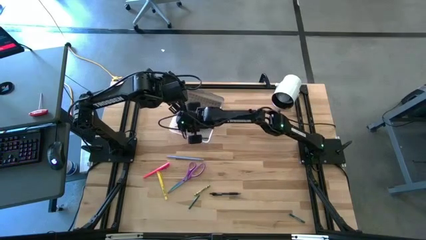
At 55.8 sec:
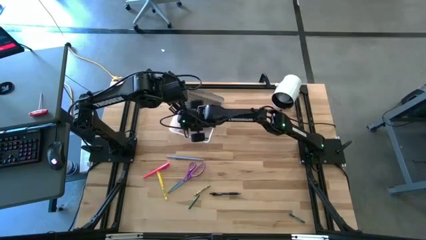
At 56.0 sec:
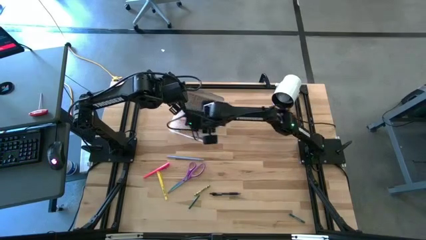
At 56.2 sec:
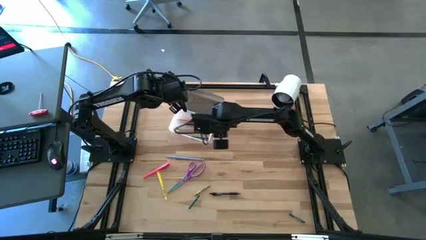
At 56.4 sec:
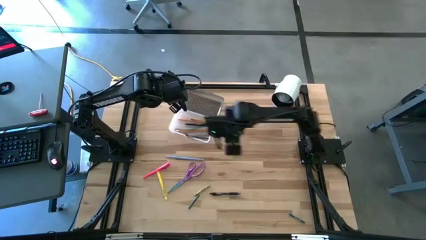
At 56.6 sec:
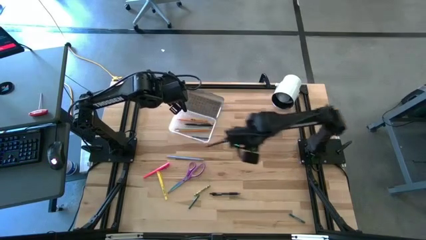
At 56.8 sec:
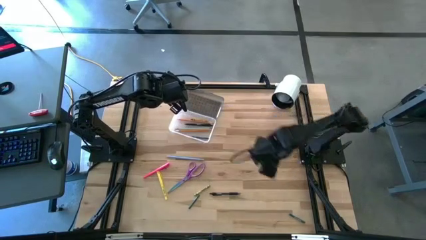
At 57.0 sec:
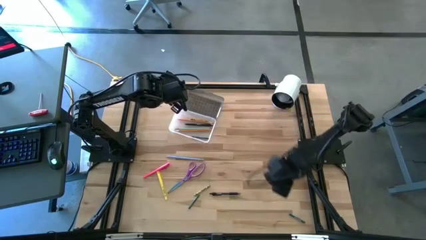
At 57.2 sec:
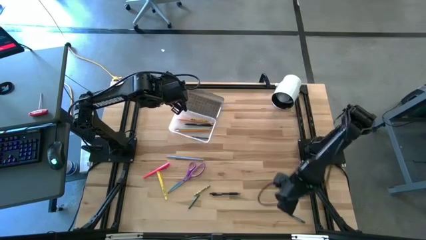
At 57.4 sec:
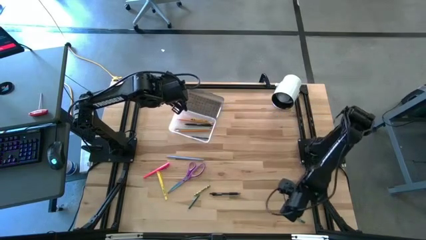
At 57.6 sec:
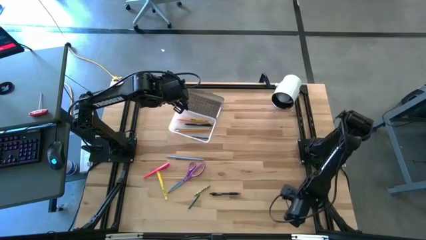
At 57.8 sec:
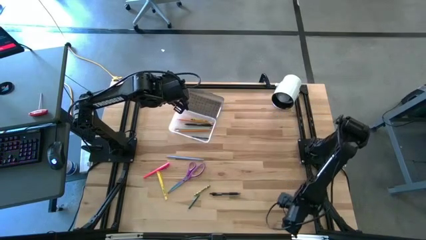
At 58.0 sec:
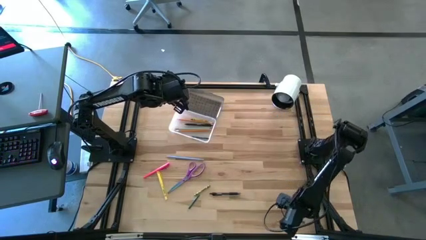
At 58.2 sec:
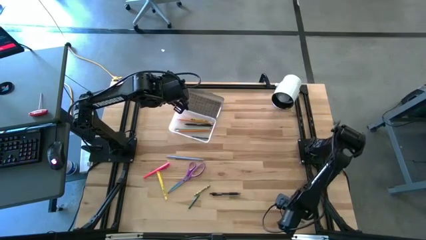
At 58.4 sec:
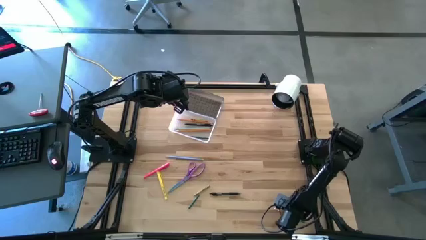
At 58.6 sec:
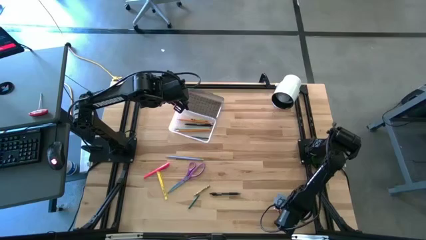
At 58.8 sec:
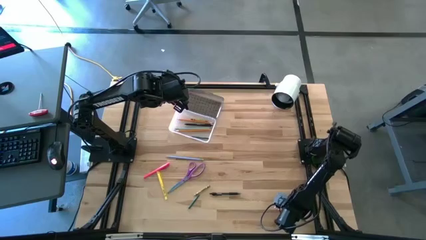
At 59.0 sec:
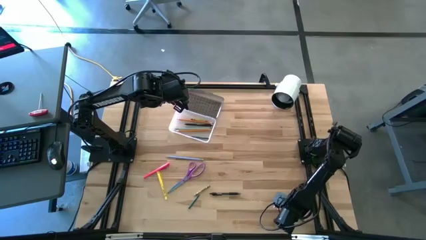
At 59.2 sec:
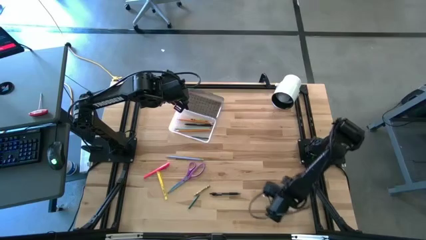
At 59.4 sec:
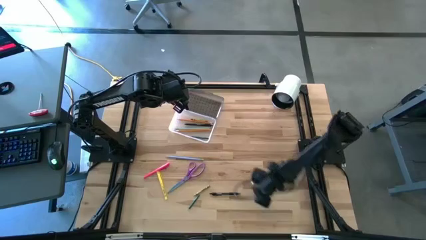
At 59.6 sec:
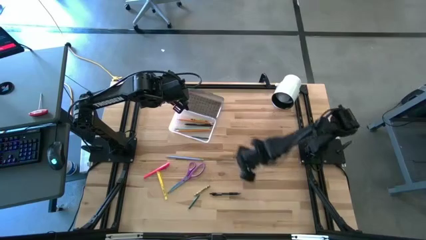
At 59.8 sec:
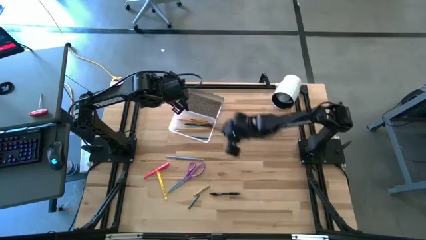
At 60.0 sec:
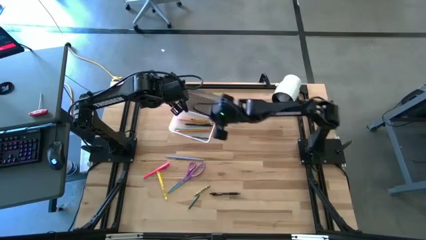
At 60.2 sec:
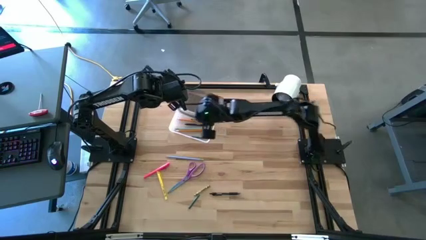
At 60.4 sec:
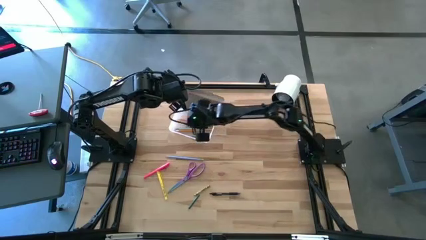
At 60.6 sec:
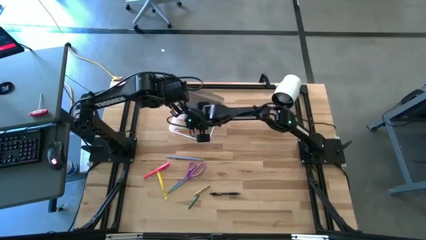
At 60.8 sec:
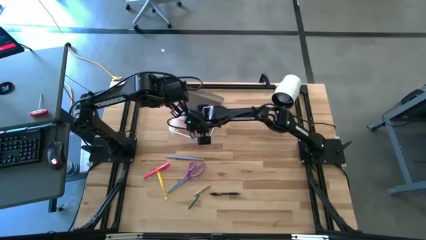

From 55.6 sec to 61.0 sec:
Task: Pick & place school supplies into a supply box
Put the green crayon into the black supply box

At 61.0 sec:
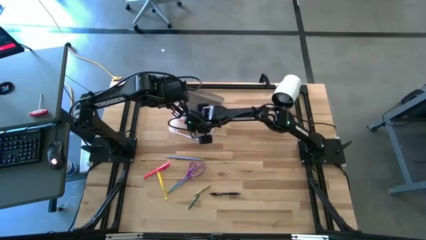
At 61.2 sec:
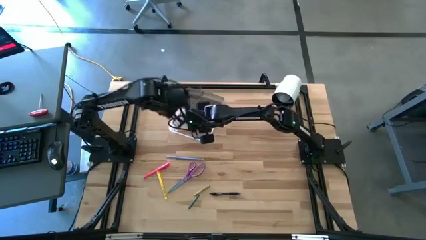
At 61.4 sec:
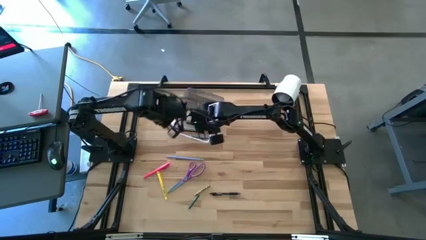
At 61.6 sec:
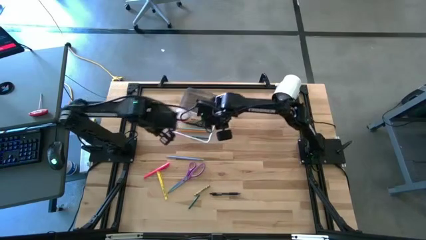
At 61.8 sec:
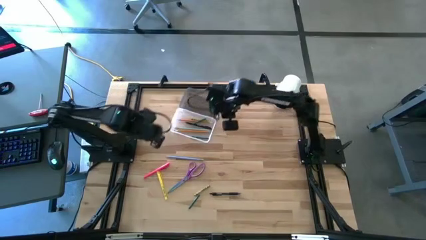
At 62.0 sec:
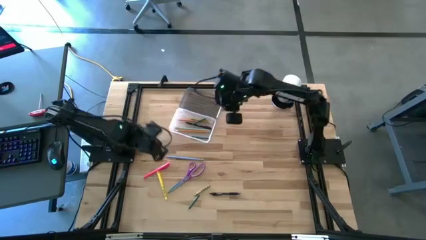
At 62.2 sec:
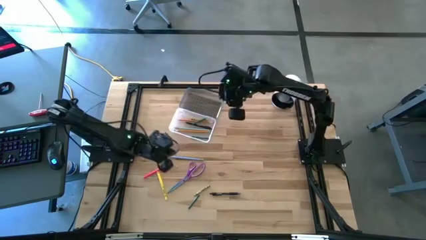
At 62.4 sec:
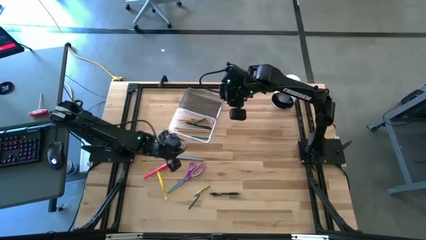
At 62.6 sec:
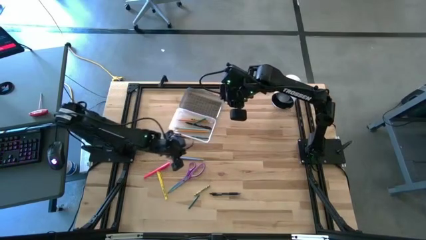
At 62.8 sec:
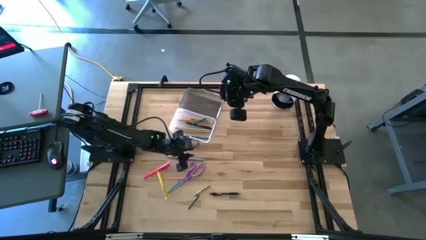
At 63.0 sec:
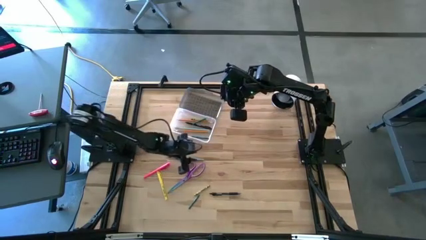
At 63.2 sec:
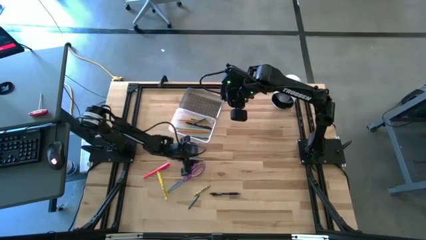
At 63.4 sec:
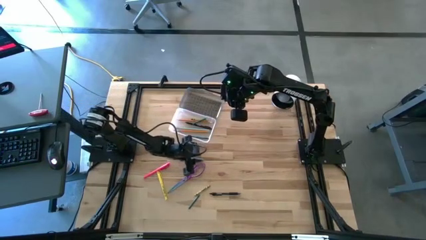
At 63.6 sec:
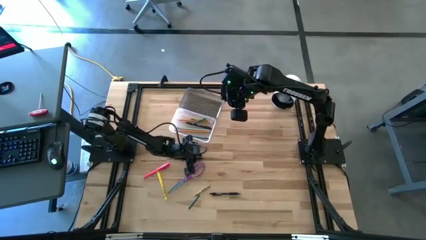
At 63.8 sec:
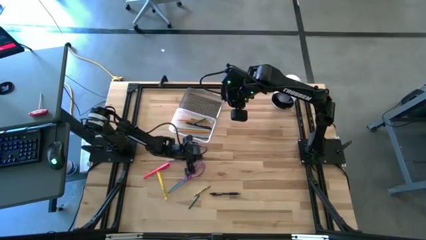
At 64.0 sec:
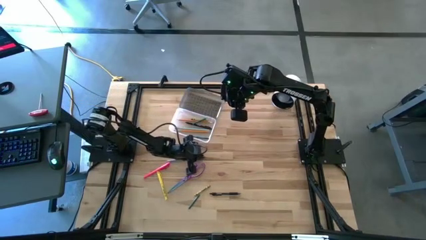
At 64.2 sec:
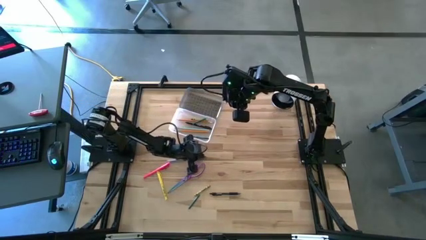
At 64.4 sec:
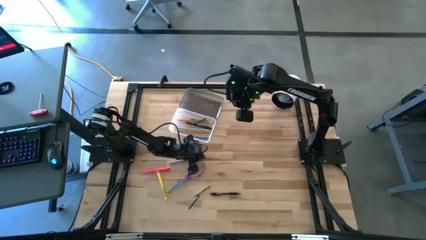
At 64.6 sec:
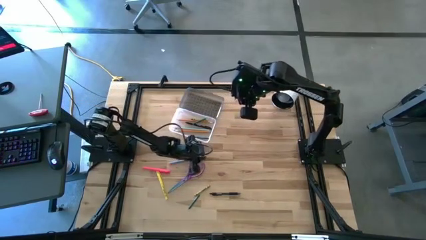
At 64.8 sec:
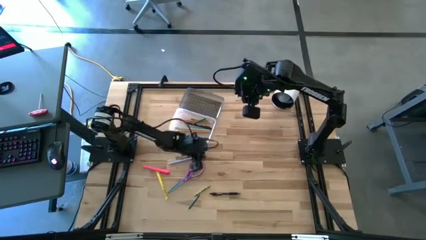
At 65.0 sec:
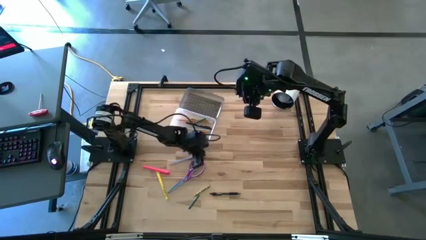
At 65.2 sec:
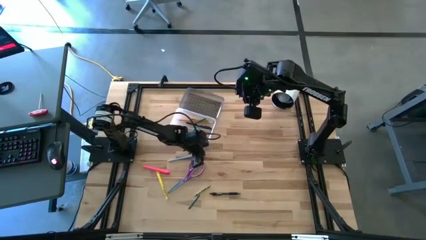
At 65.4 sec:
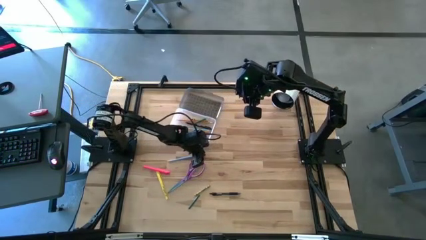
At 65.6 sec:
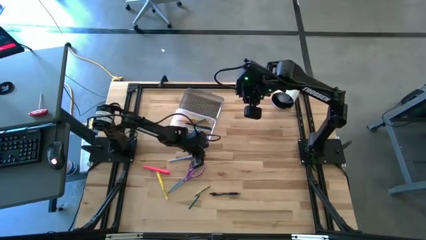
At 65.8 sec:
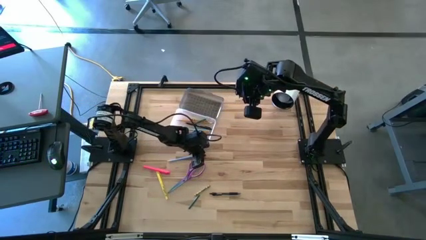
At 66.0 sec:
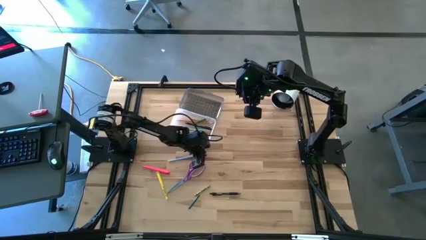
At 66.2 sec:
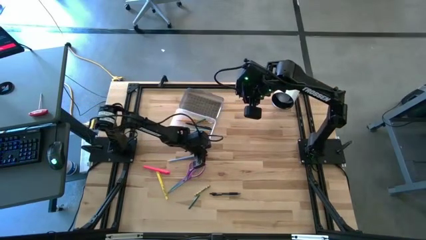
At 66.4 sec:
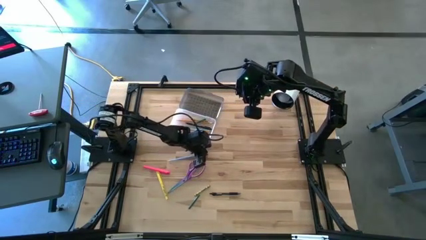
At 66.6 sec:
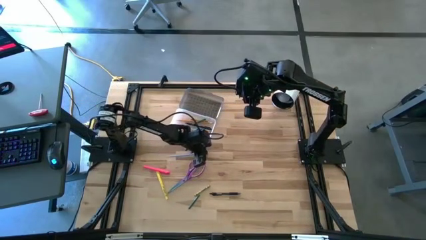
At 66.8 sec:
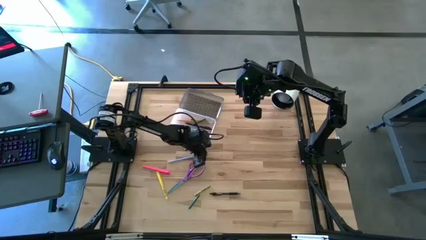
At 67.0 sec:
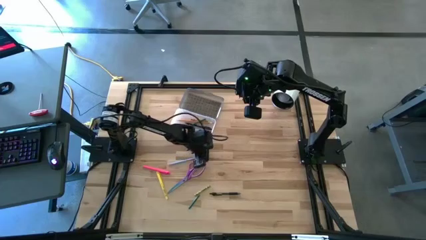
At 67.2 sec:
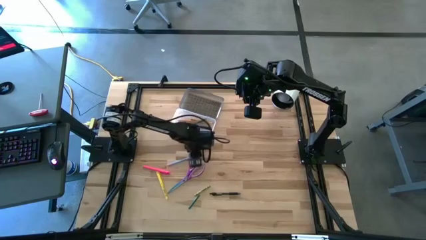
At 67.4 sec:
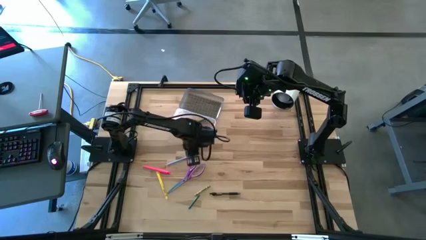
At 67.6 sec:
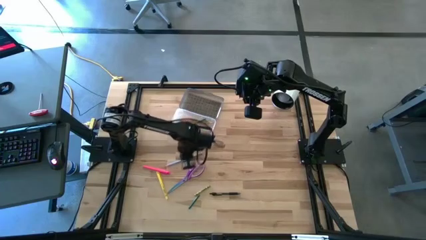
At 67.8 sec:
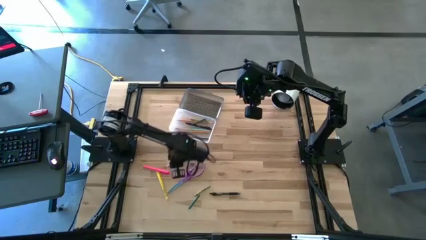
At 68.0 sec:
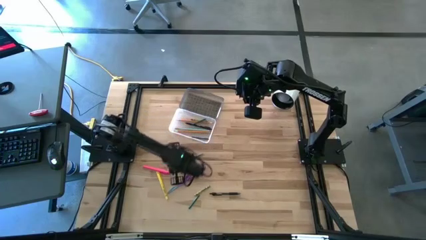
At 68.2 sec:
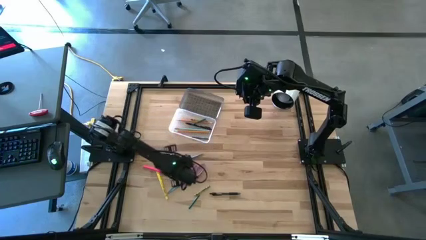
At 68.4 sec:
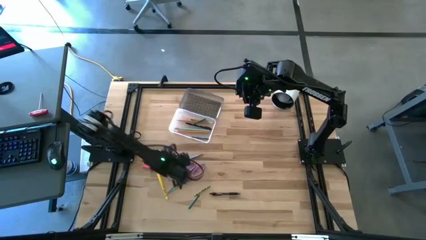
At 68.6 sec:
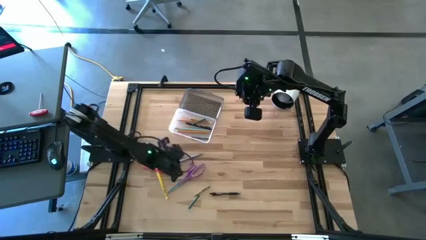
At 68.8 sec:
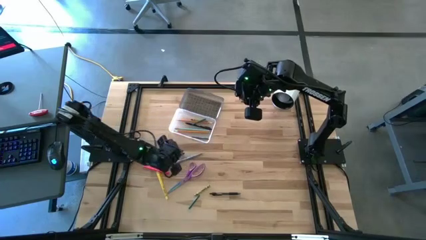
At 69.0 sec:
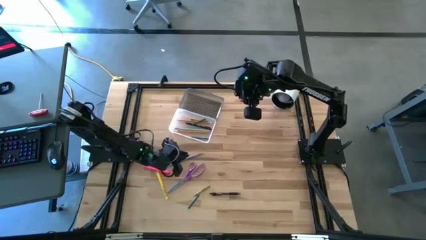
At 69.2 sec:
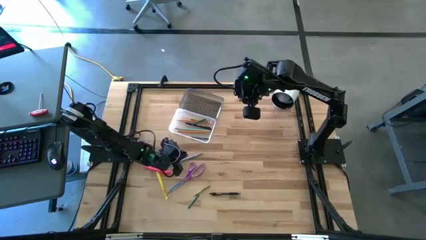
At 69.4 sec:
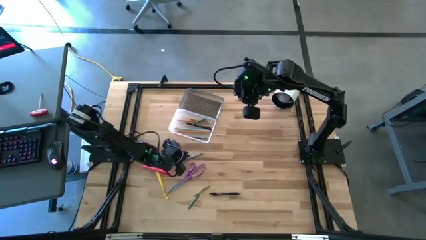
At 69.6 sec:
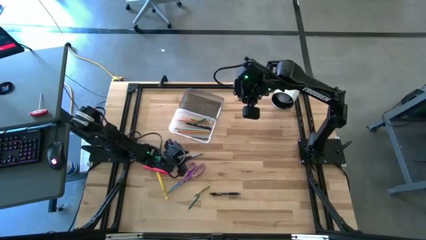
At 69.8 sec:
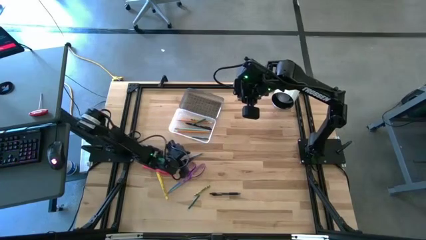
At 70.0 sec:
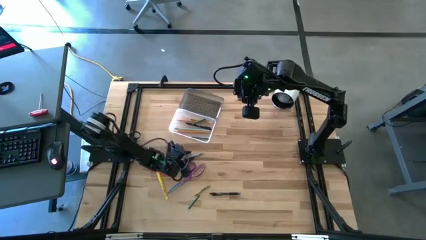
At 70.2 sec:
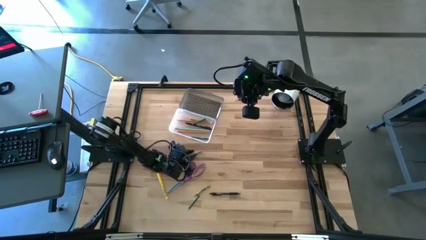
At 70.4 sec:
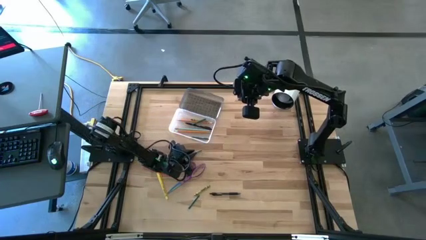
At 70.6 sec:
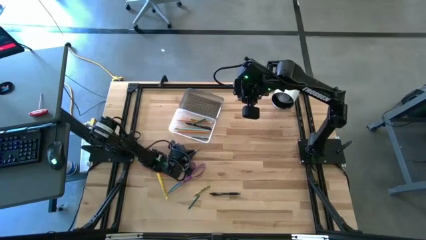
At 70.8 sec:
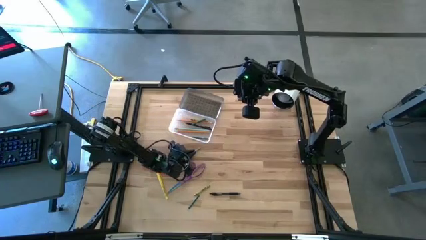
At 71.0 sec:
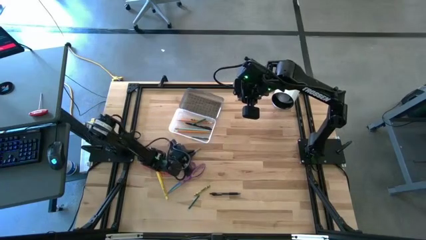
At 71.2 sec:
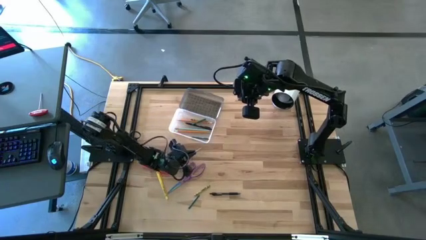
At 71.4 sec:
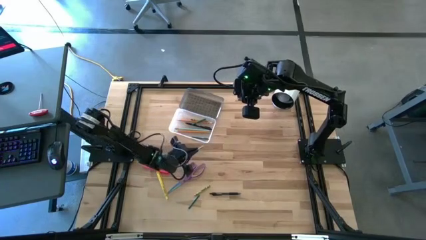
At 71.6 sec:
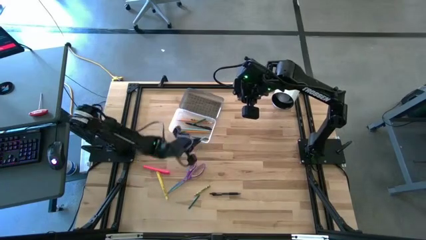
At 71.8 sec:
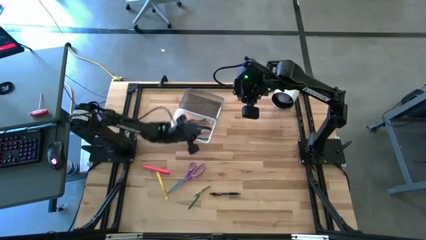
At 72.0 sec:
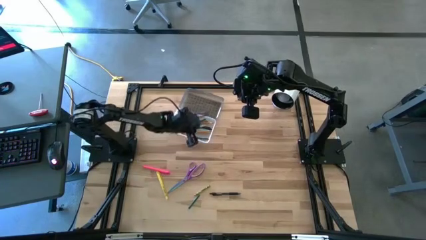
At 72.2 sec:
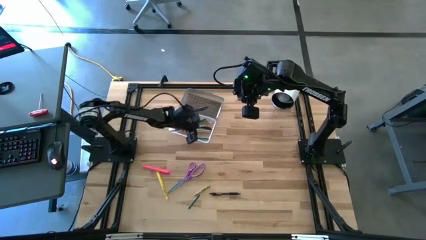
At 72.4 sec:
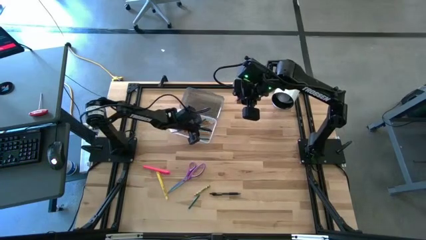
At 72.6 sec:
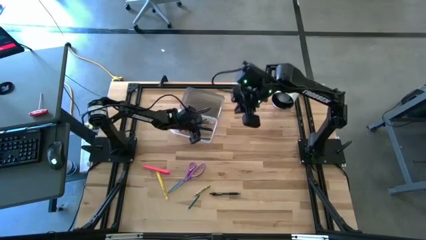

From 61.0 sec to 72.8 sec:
Put the blue pencil into the black supply box
